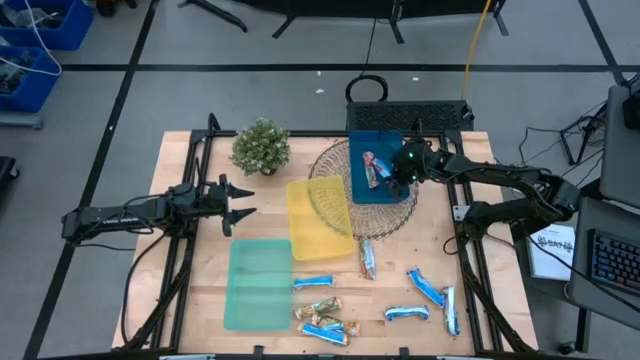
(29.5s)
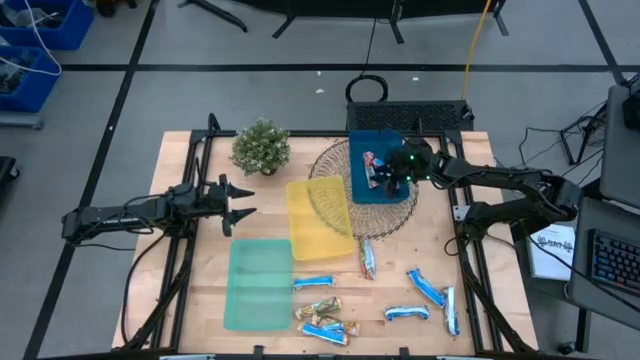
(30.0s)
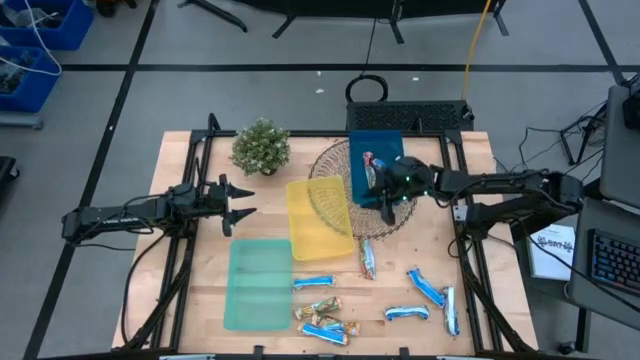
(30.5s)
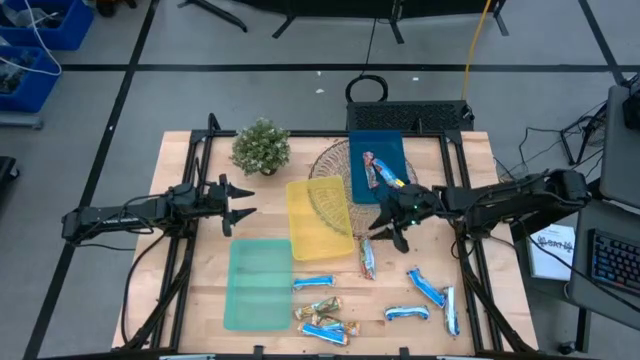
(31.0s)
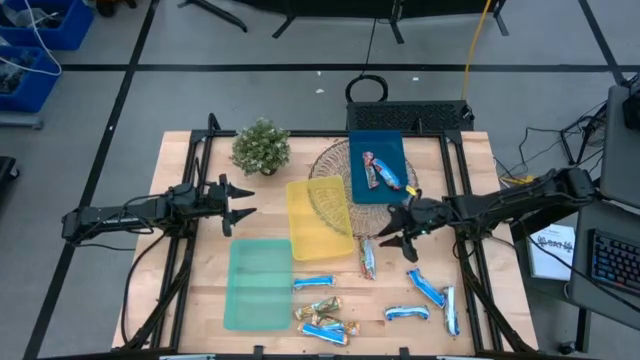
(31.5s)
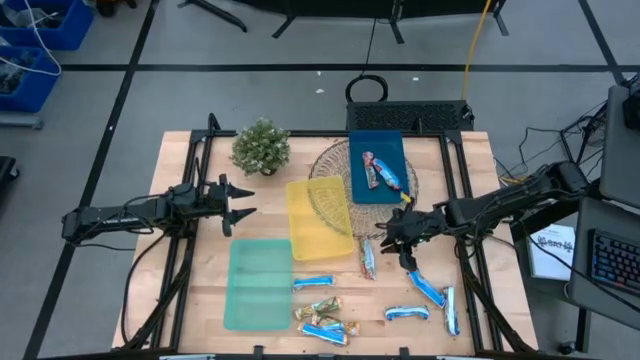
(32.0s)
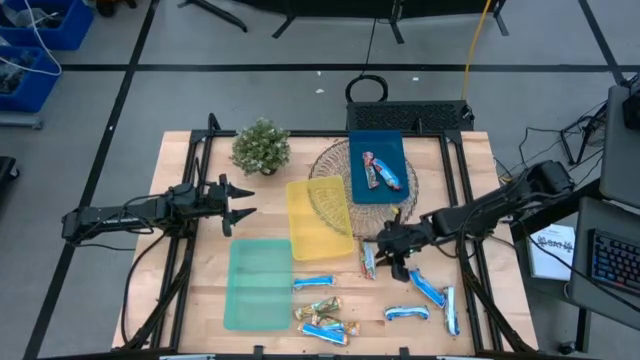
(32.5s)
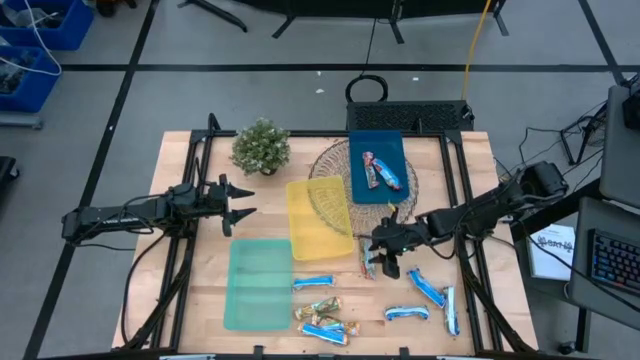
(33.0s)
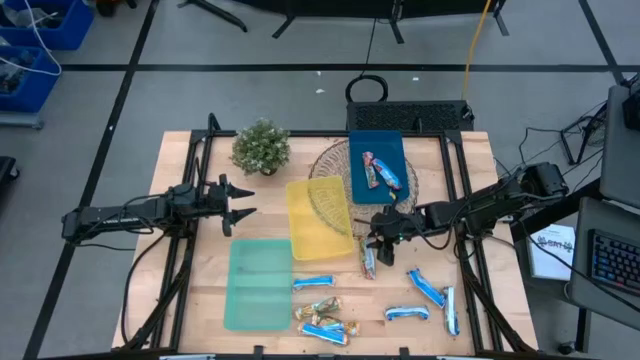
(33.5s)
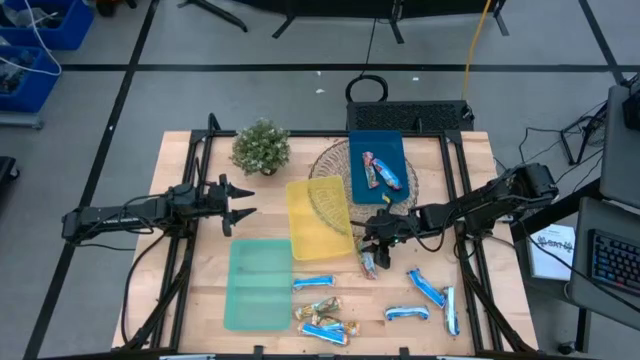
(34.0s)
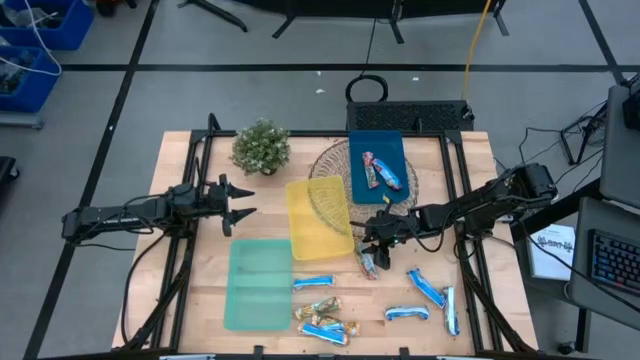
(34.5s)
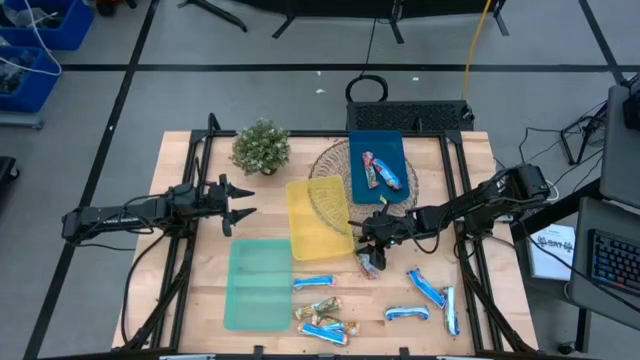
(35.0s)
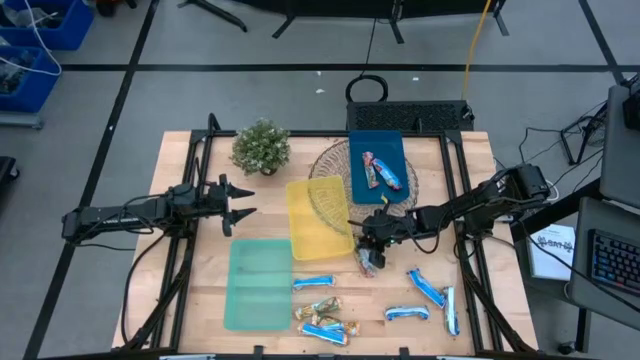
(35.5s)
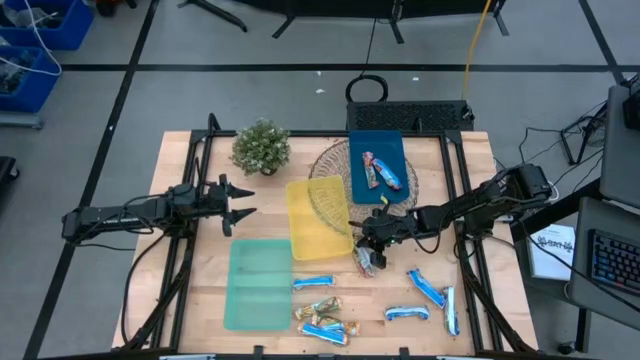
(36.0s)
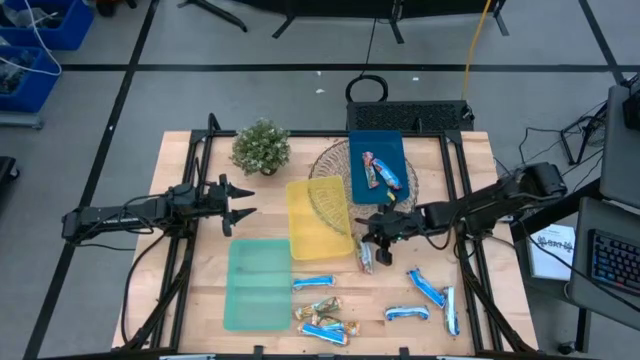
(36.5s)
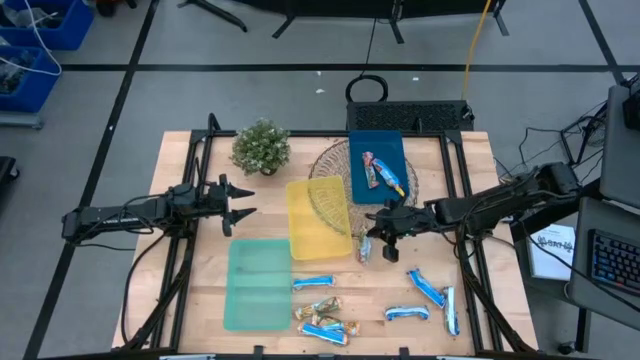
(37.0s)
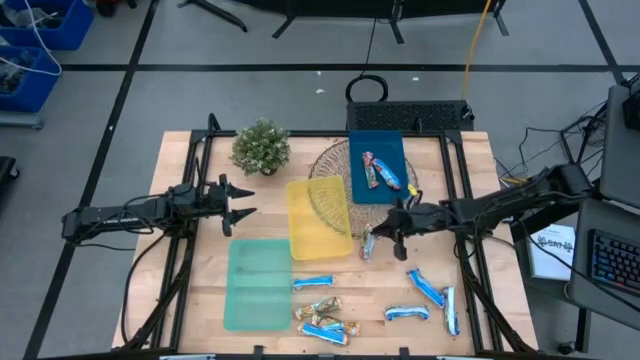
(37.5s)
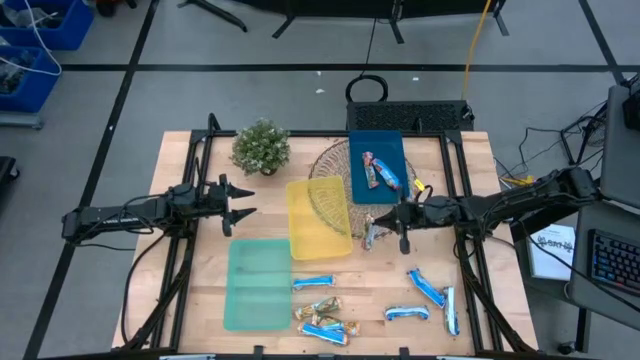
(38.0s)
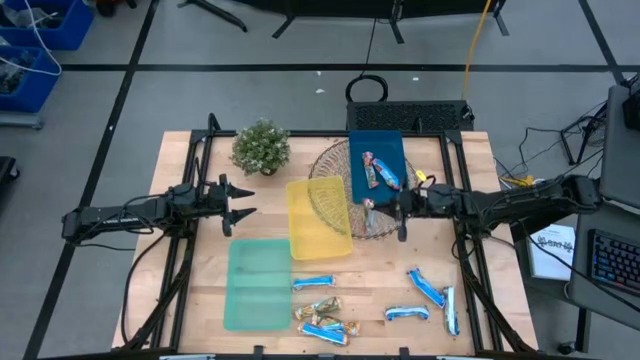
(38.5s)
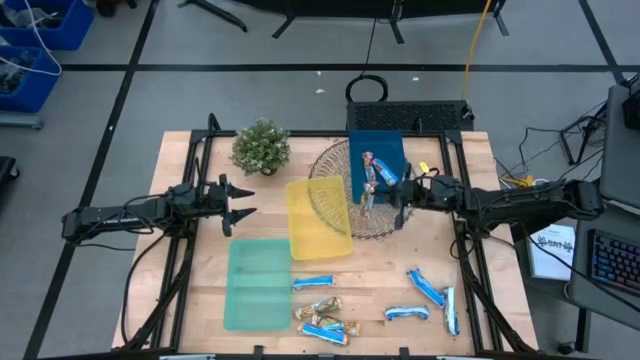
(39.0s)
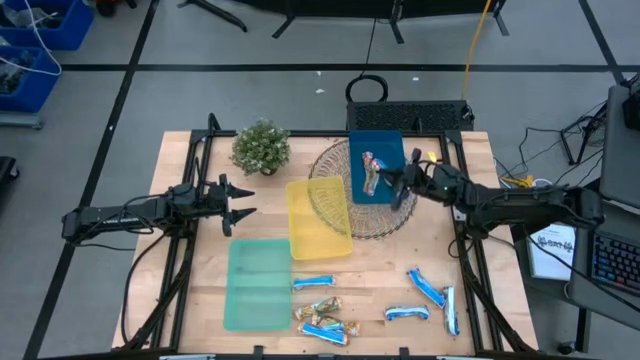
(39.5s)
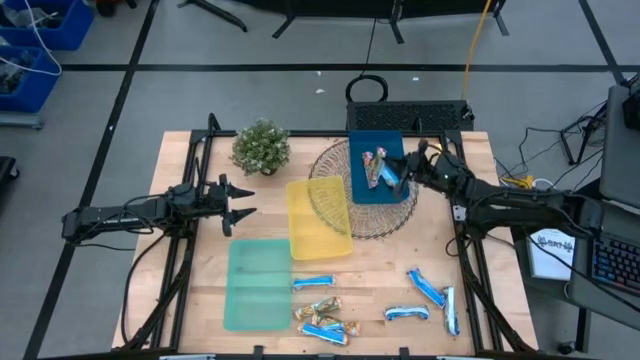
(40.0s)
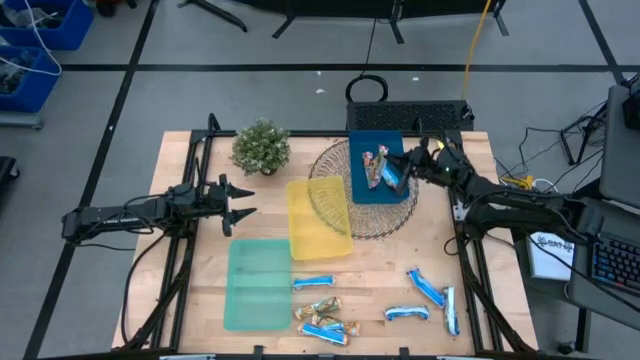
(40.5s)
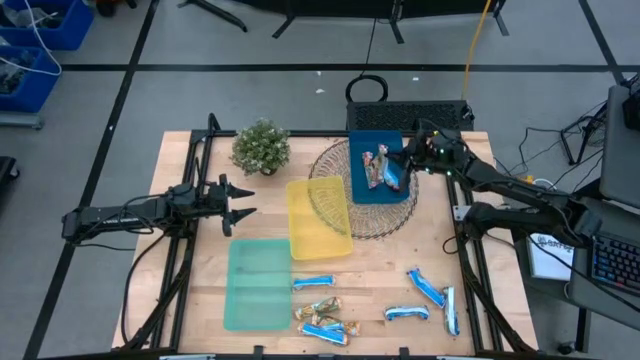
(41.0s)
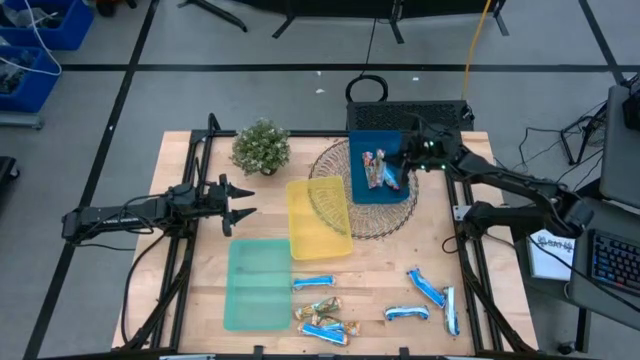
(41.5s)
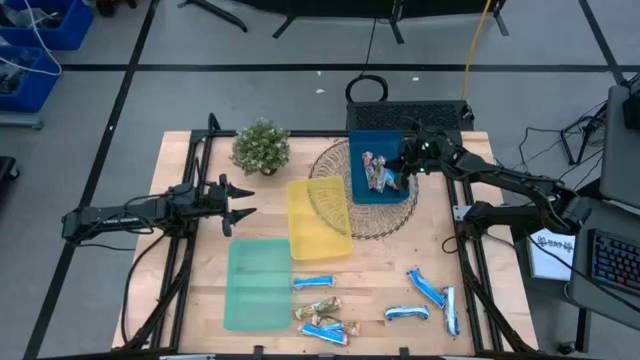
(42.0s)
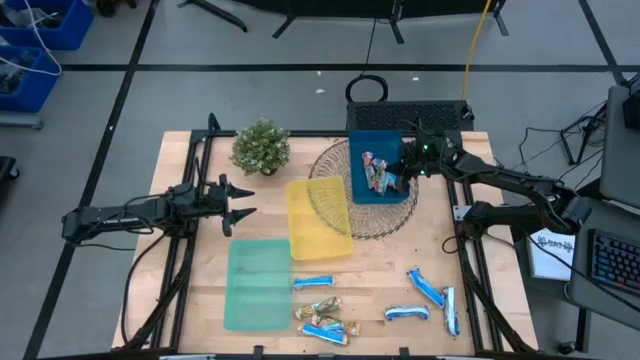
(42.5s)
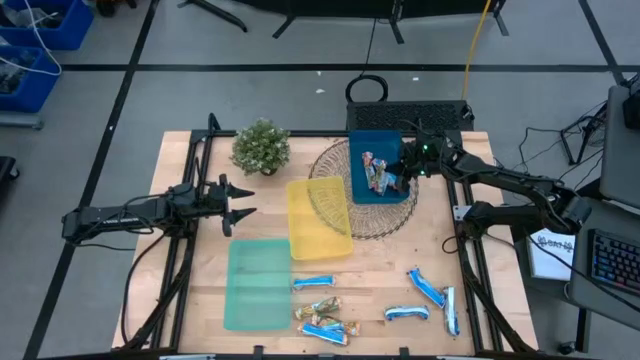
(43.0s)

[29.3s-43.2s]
Task: Pick and place Granola Bars by type
Put the red granola bar into the blue bin

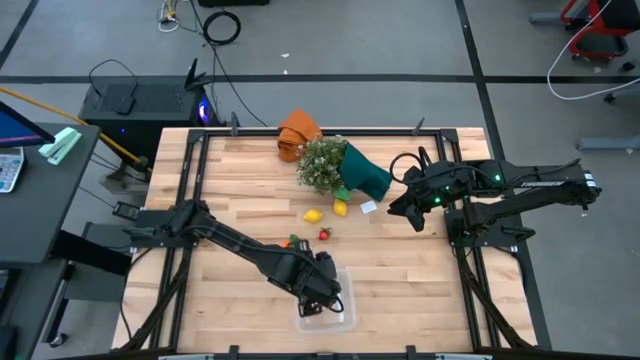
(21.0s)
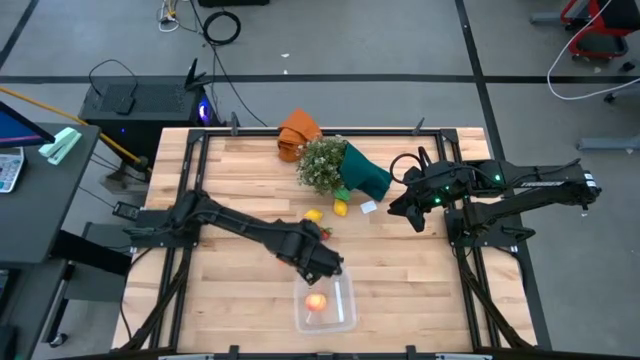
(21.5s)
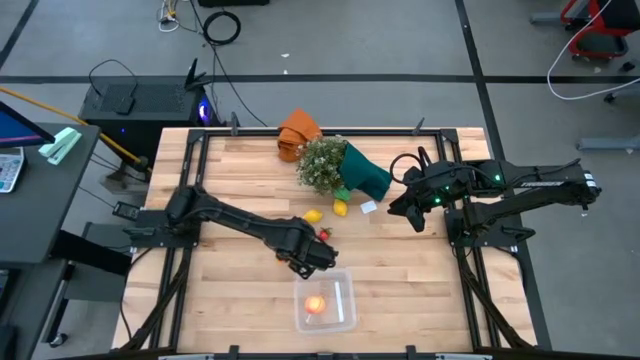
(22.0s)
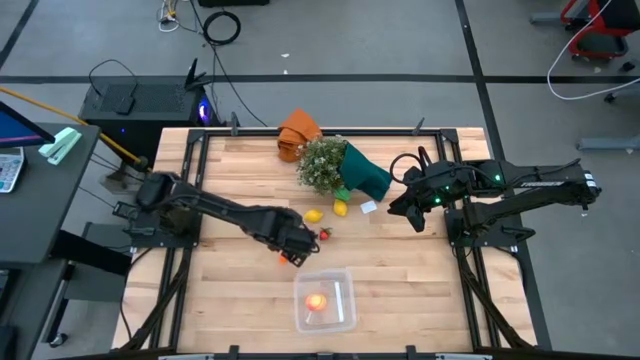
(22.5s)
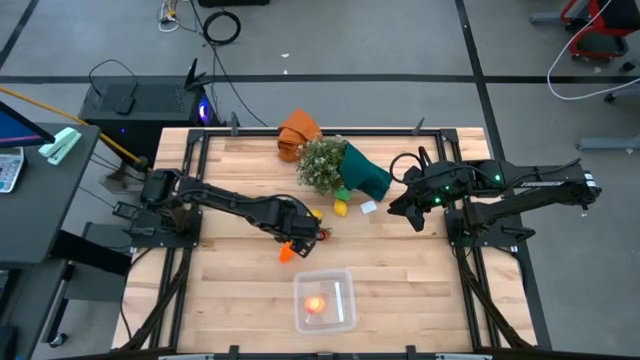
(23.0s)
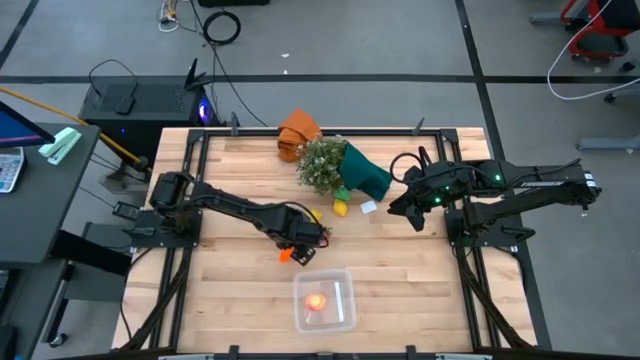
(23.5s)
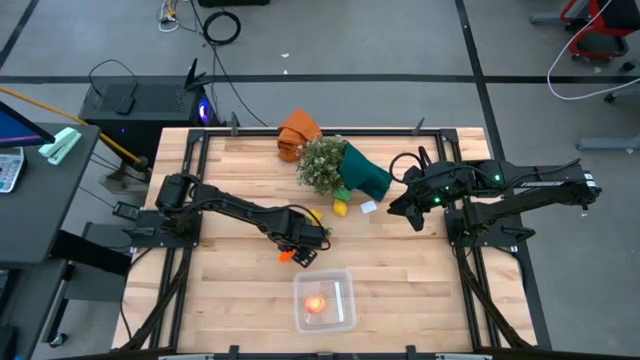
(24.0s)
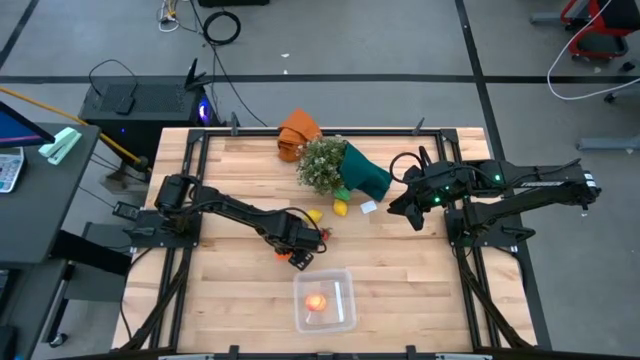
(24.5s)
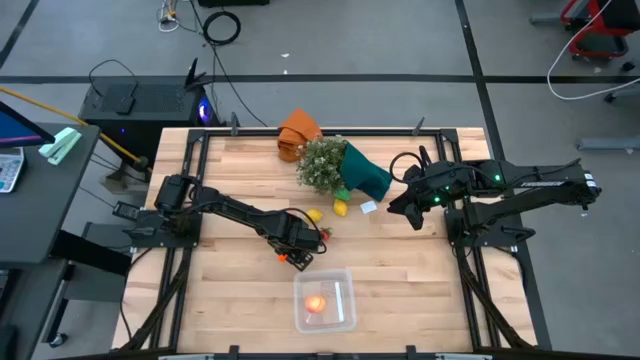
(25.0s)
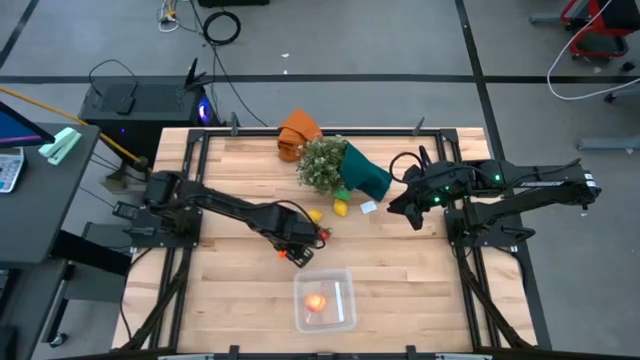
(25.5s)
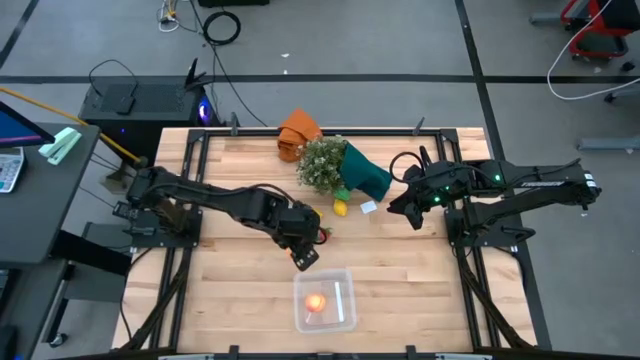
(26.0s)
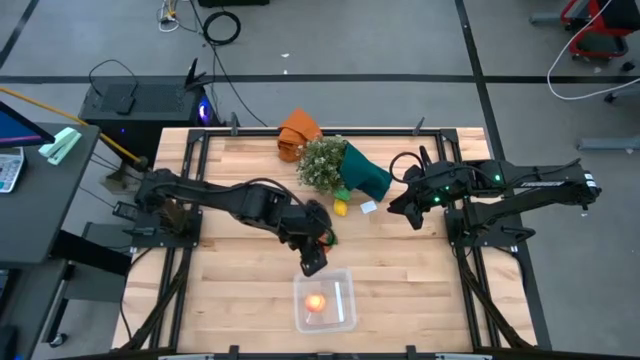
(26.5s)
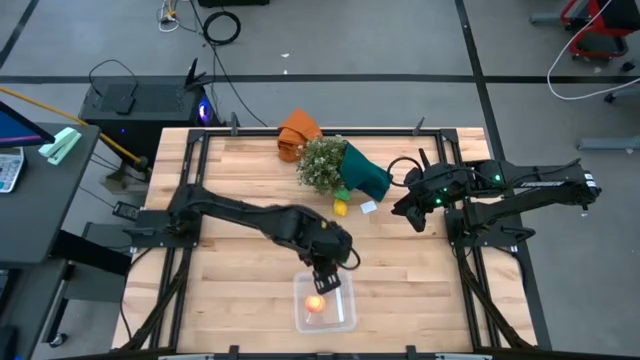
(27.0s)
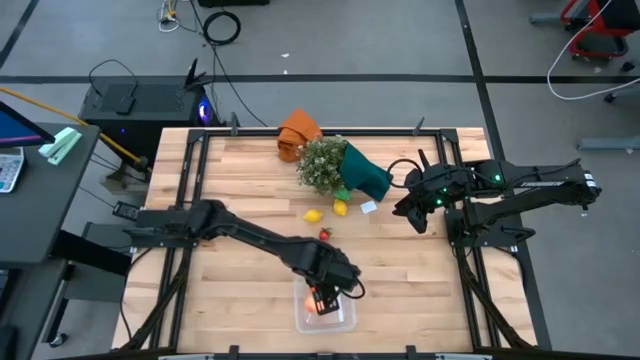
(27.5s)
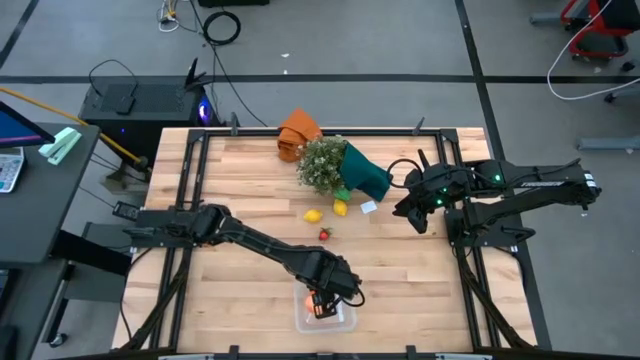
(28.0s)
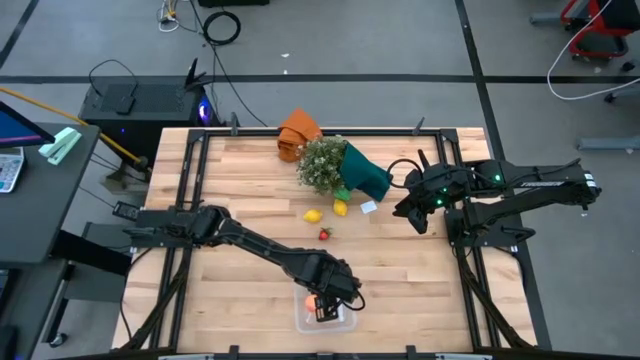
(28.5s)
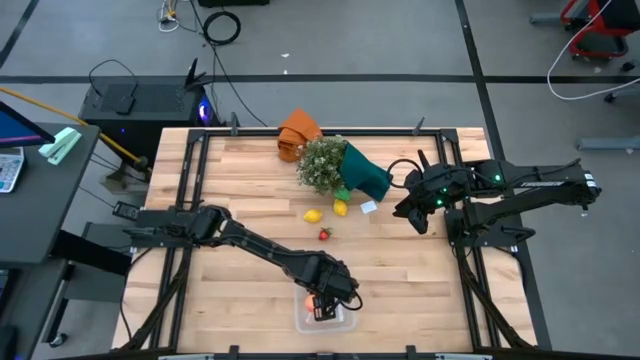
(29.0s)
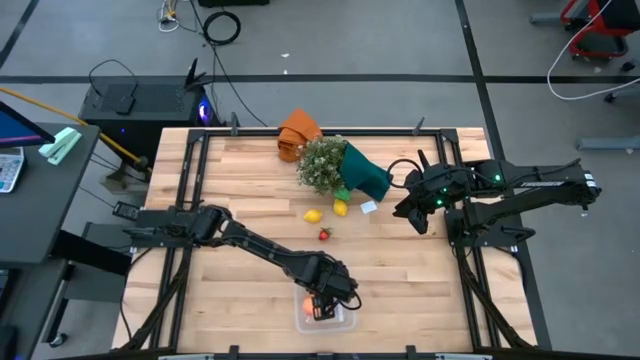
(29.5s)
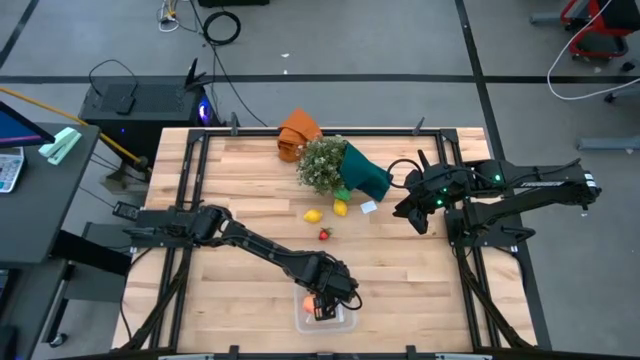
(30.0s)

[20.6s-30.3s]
Task: Pick and placing Produce into tupperware
Put the carrot into the transparent container
